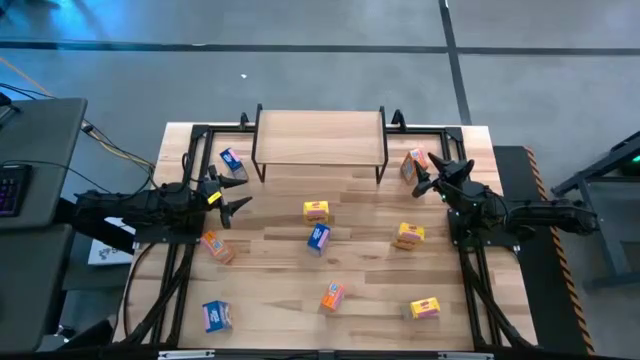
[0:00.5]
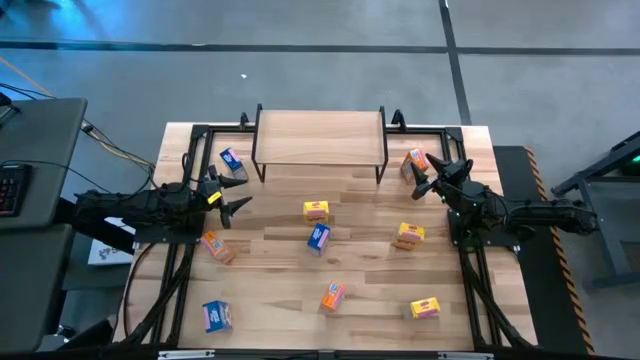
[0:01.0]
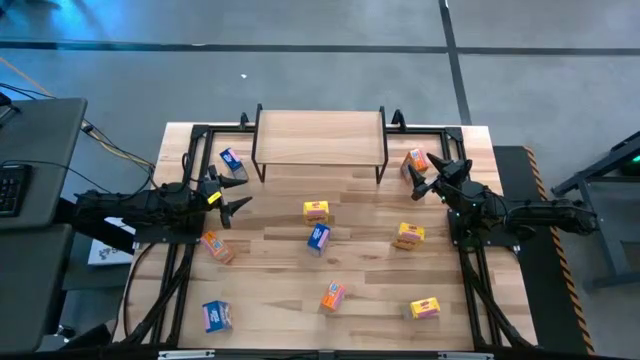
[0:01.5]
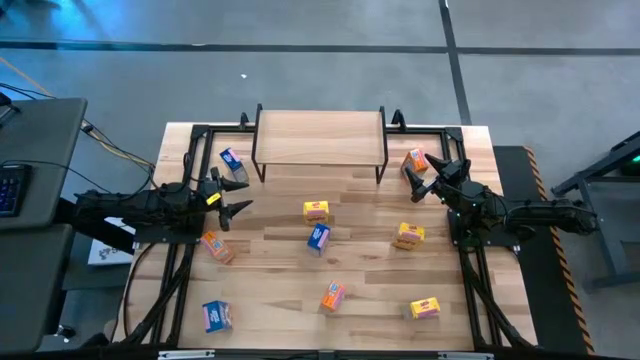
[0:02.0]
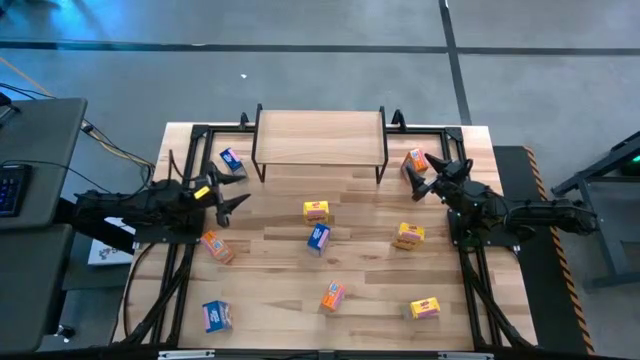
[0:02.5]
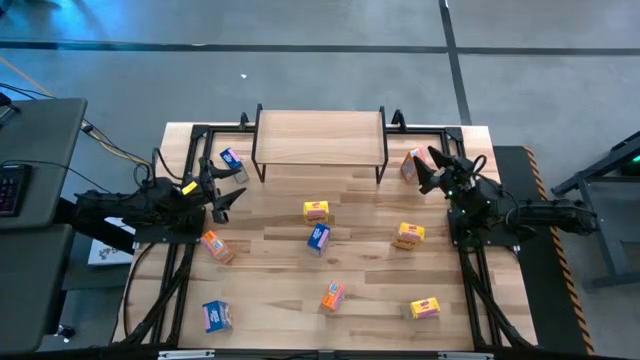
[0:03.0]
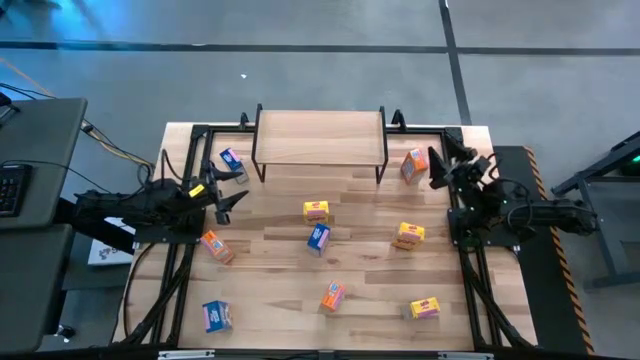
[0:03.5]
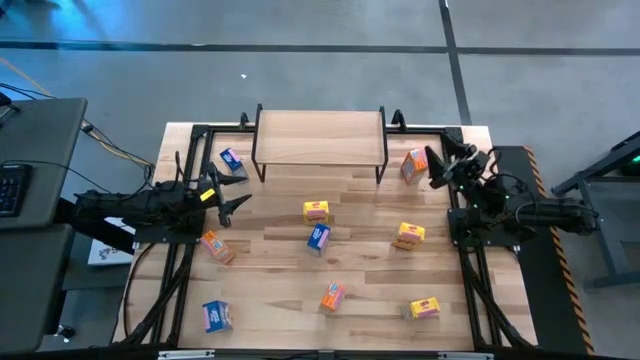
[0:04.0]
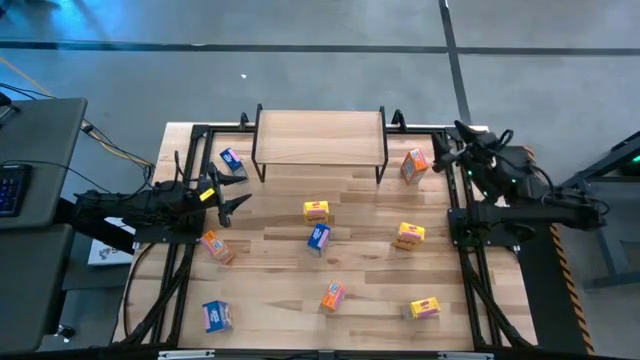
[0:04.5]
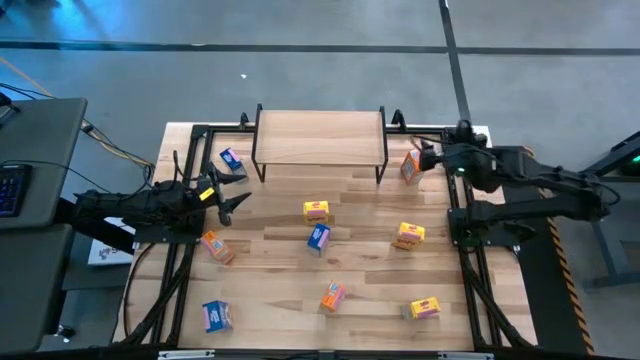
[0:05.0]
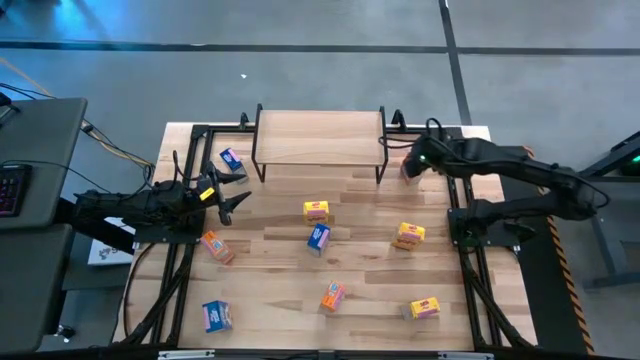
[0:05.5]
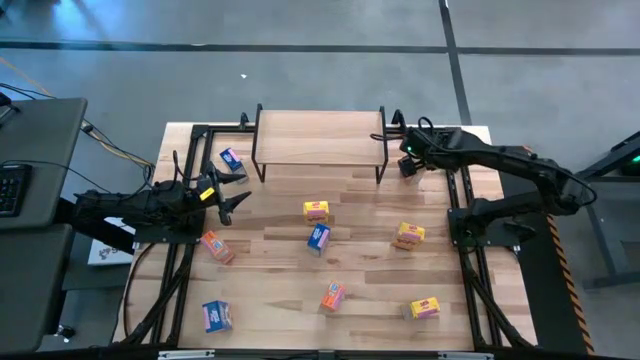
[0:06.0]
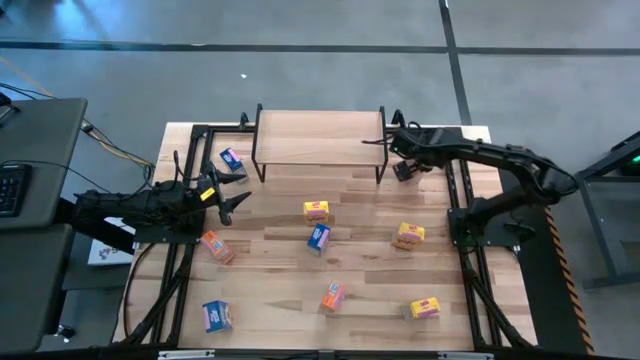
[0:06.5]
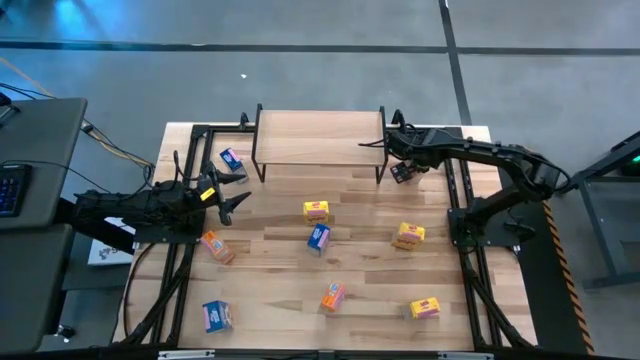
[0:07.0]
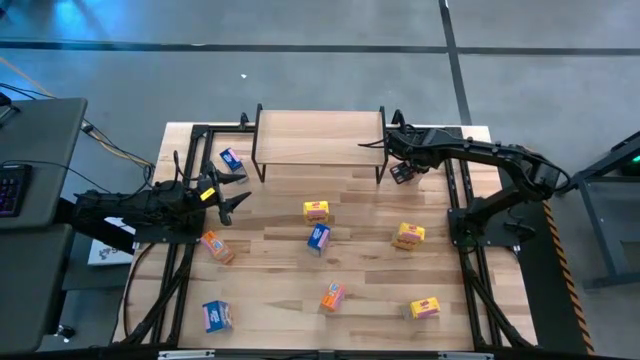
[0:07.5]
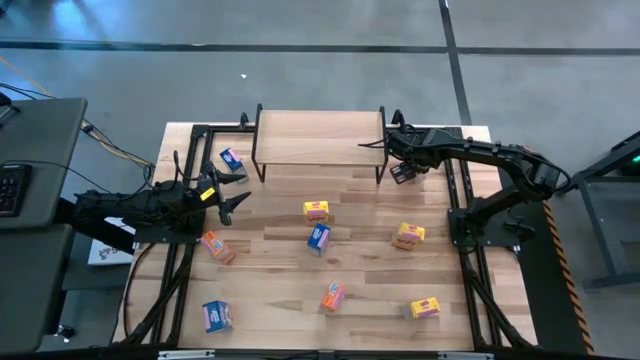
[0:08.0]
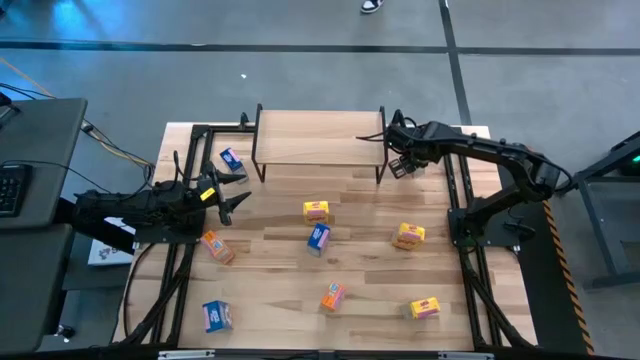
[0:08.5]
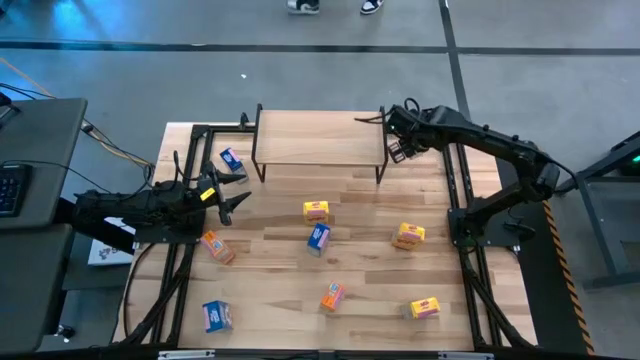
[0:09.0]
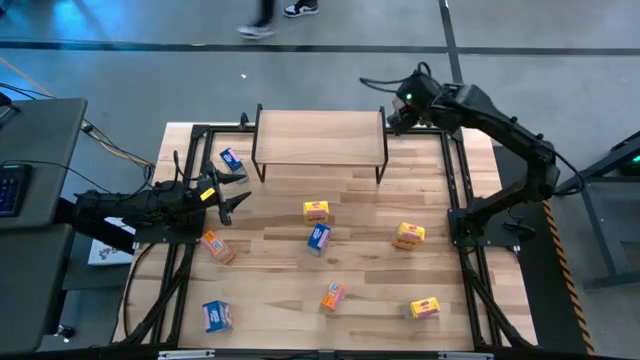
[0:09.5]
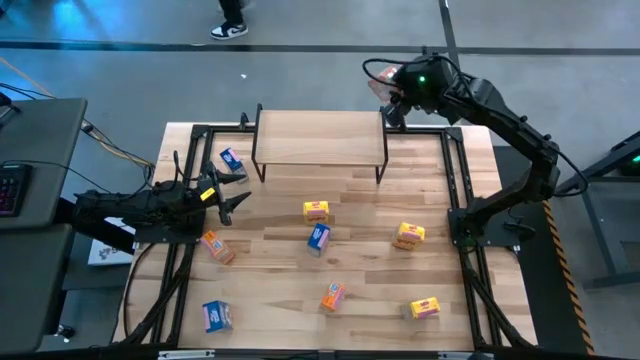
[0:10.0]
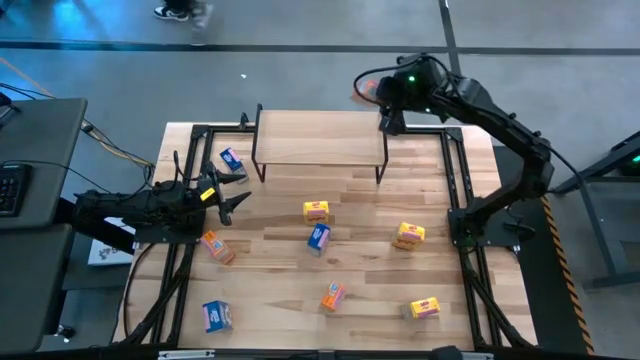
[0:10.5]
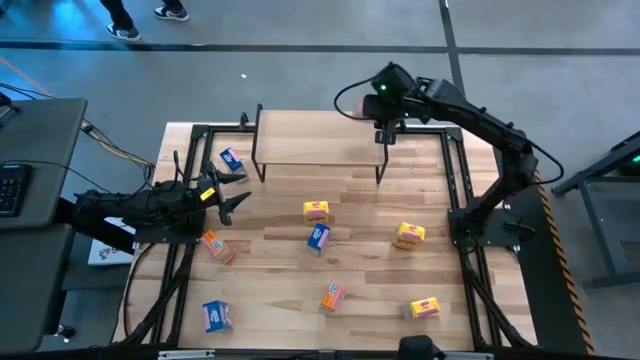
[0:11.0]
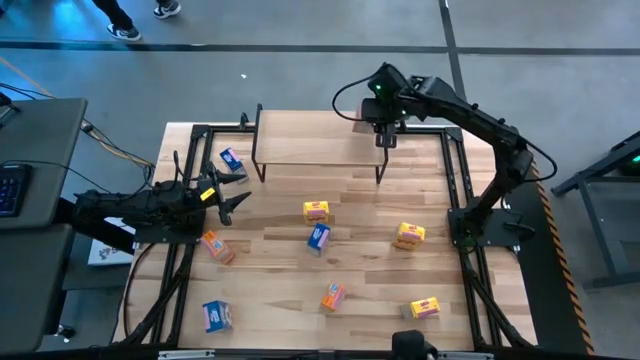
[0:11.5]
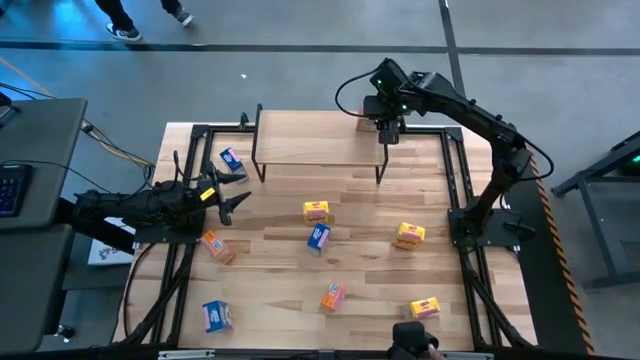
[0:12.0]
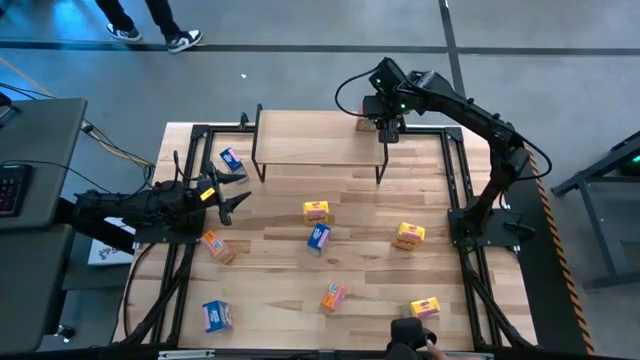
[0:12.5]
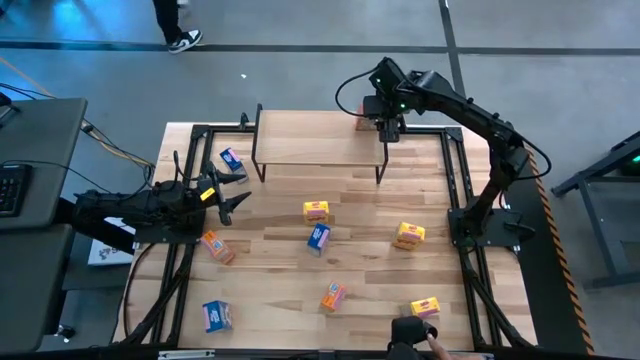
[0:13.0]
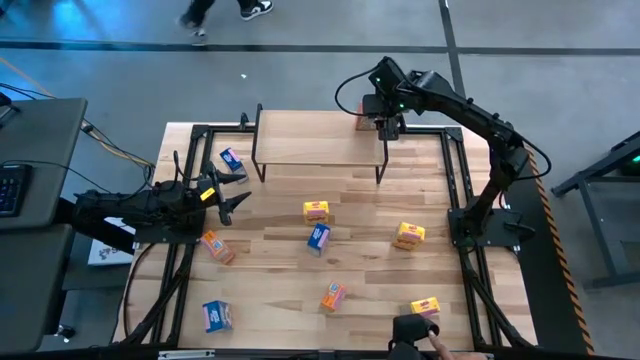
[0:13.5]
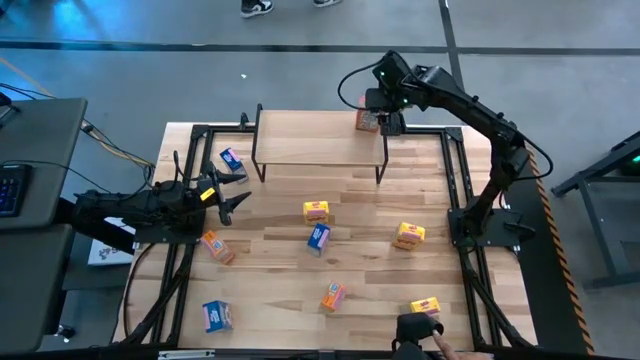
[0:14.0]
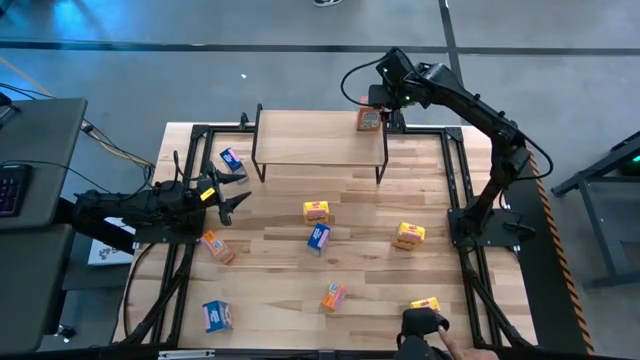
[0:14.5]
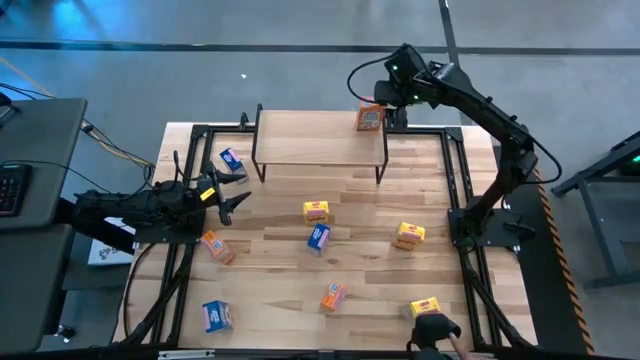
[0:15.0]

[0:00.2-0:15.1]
Task: Stack cereal on shelf
Put the top orange cereal box on the shelf

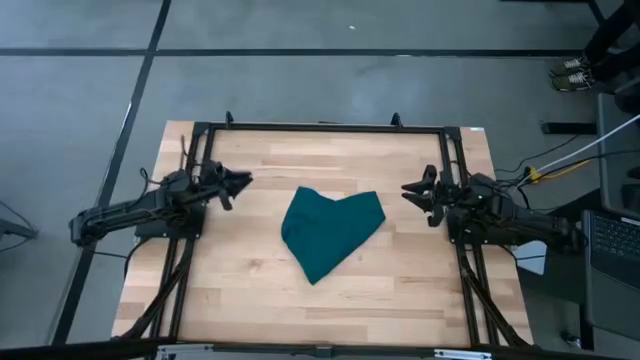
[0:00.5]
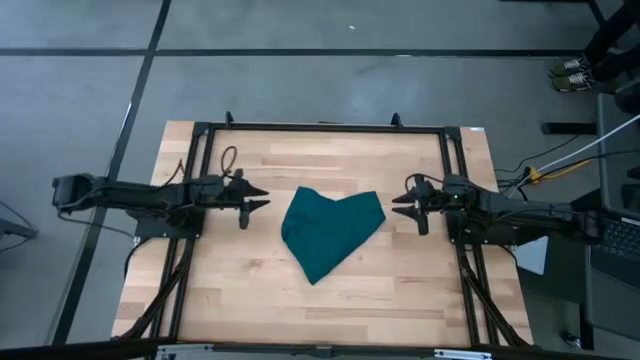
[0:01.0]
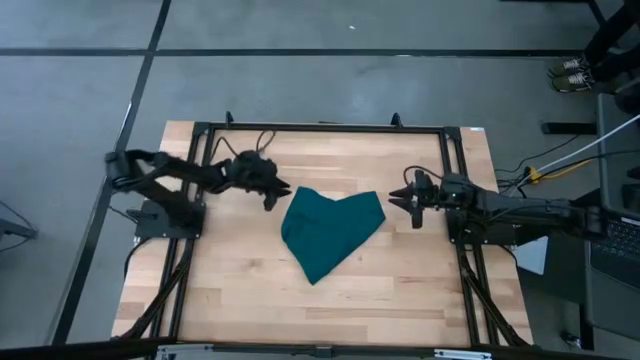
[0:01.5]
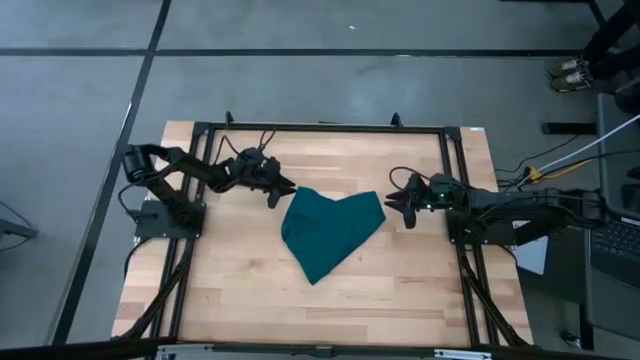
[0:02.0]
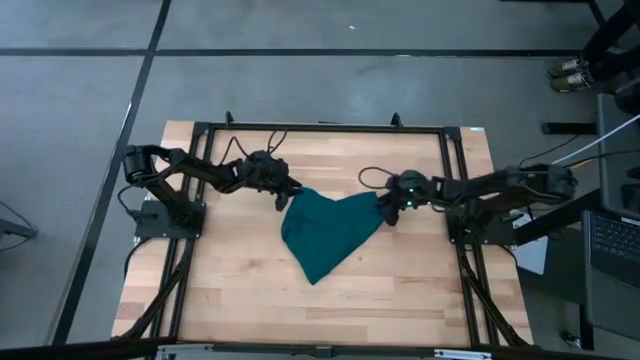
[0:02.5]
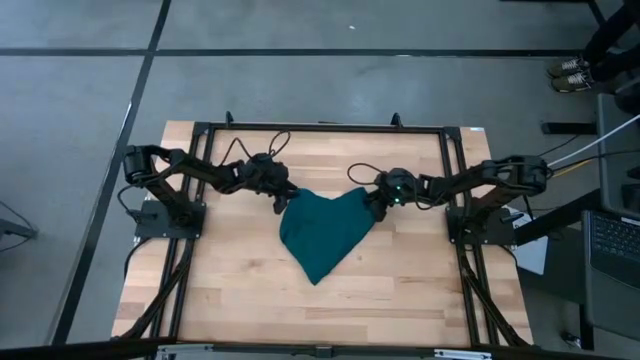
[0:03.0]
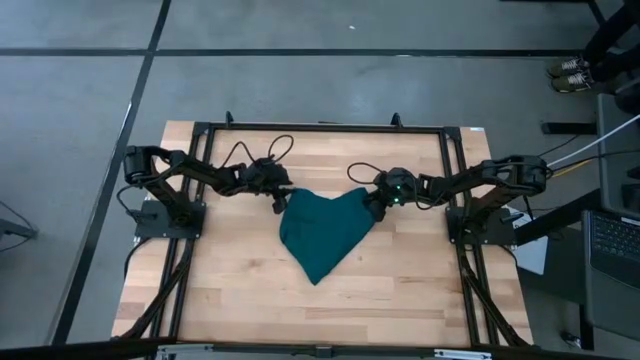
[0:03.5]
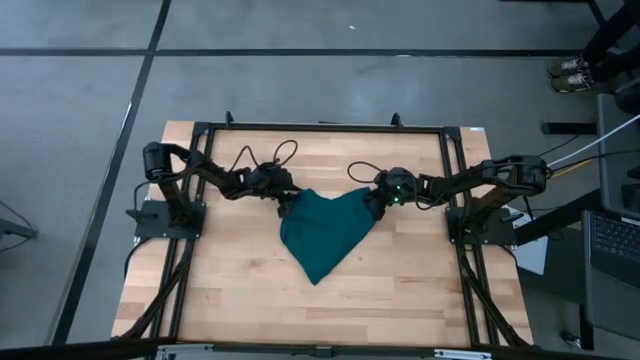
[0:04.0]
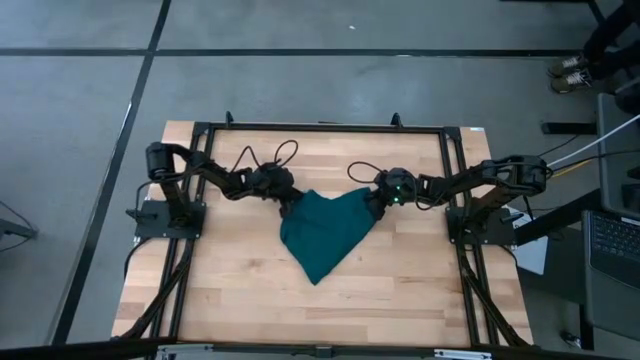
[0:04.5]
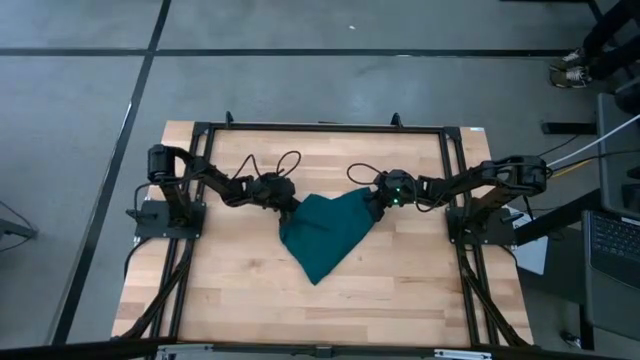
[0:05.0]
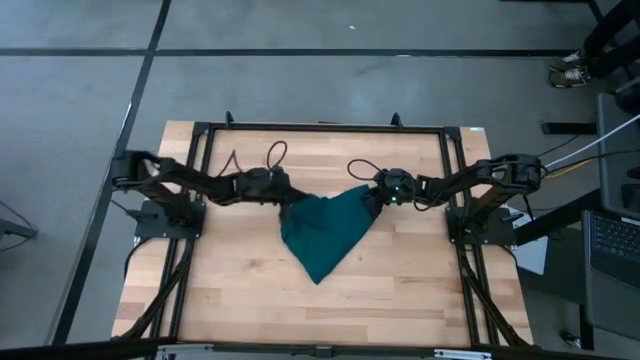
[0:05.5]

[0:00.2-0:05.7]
Task: Fold microfiber towels
Fold the blue napkin
